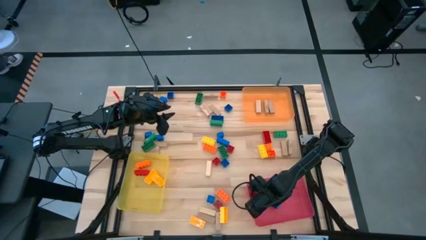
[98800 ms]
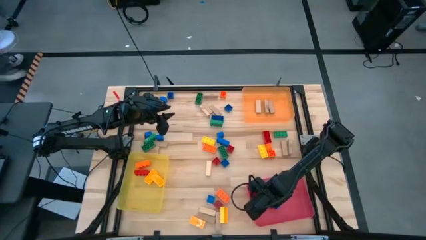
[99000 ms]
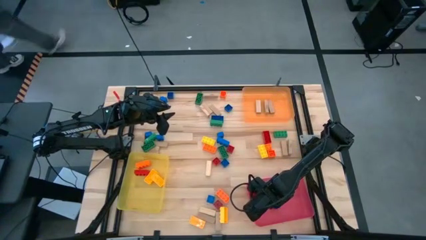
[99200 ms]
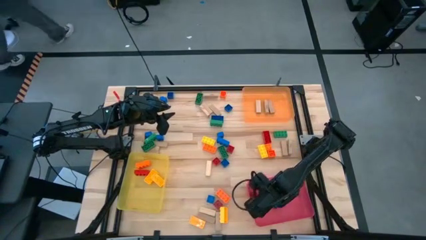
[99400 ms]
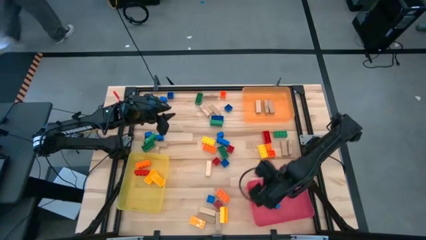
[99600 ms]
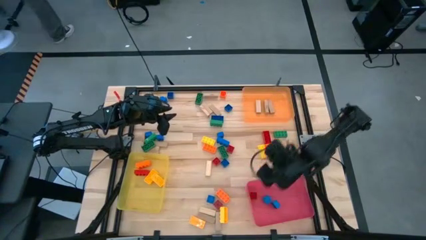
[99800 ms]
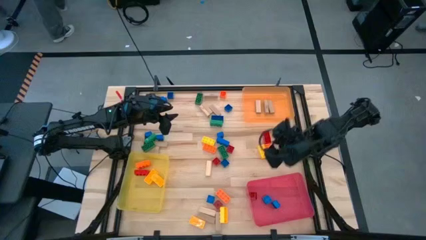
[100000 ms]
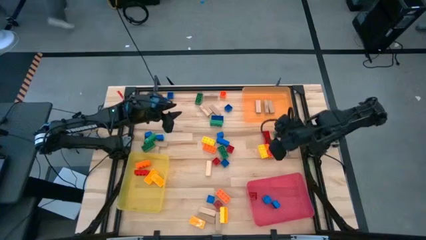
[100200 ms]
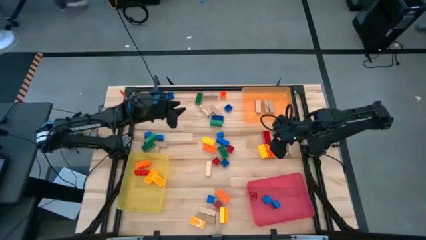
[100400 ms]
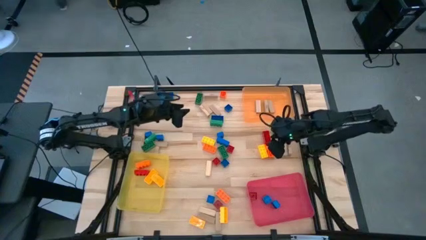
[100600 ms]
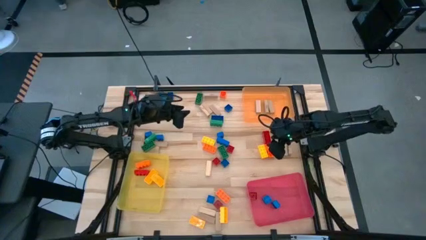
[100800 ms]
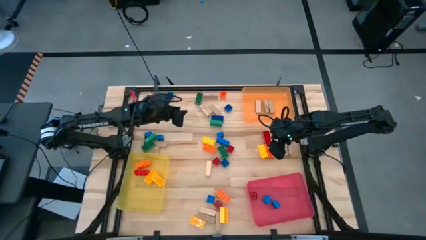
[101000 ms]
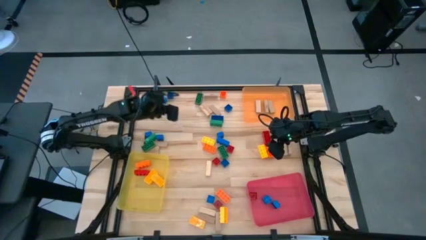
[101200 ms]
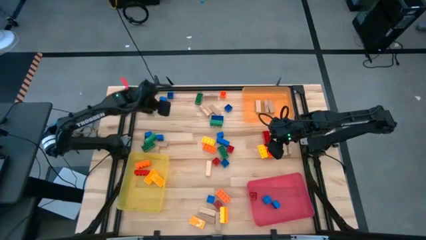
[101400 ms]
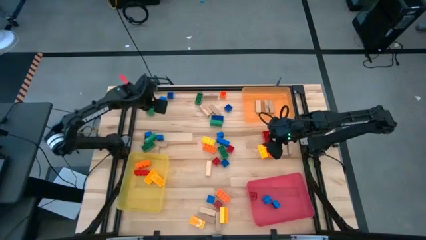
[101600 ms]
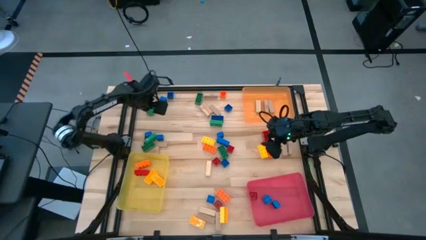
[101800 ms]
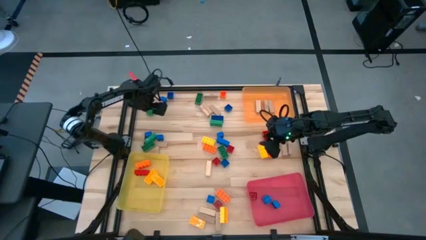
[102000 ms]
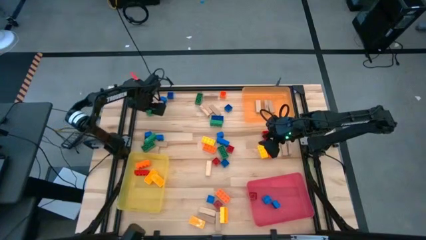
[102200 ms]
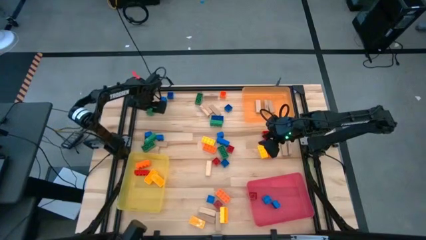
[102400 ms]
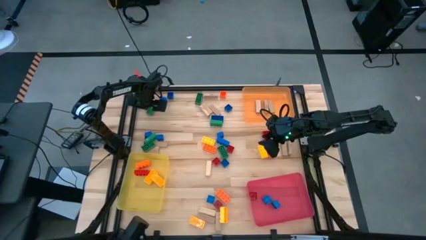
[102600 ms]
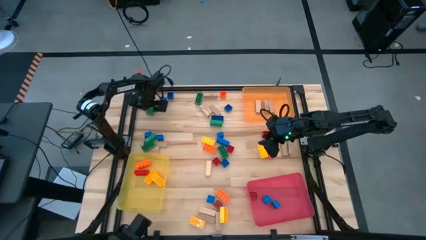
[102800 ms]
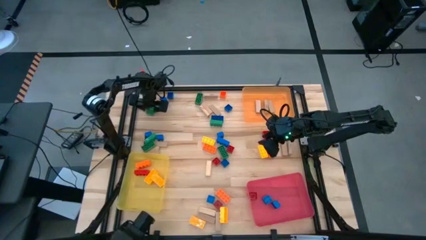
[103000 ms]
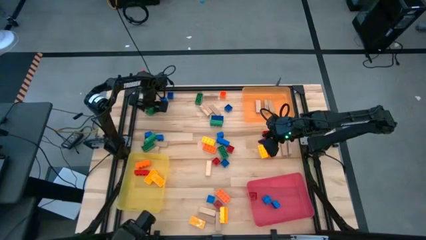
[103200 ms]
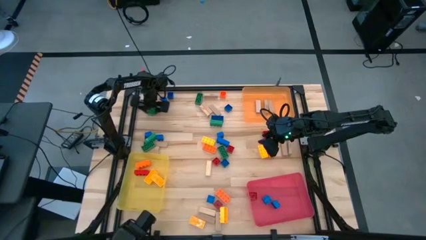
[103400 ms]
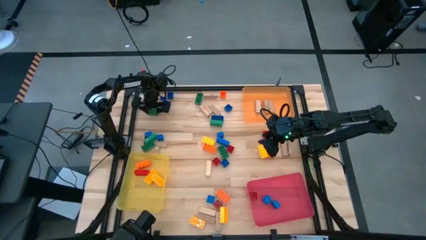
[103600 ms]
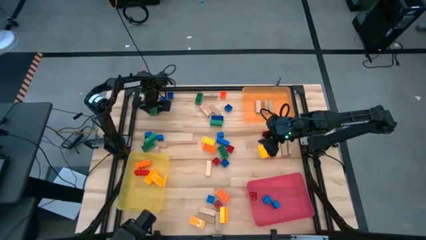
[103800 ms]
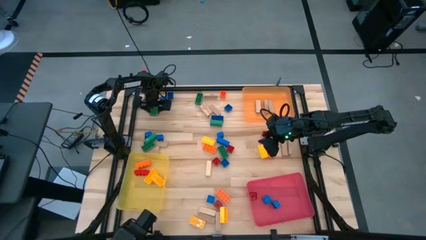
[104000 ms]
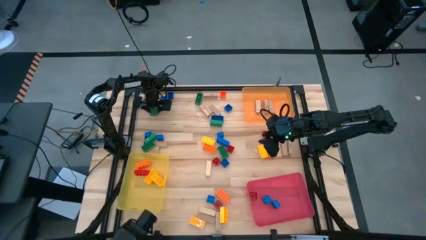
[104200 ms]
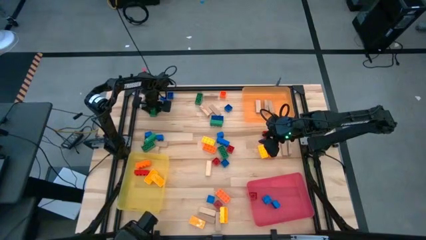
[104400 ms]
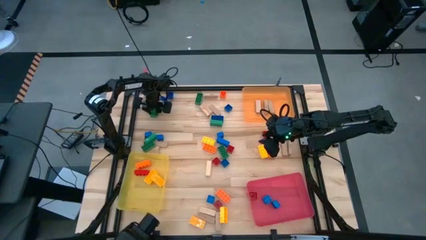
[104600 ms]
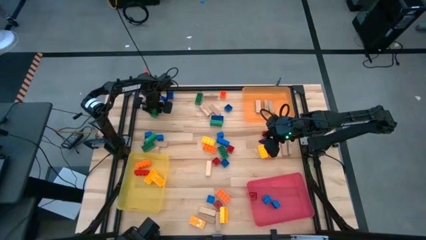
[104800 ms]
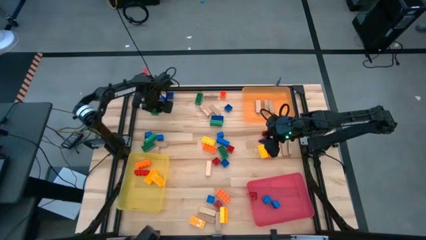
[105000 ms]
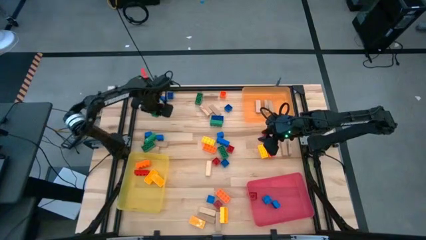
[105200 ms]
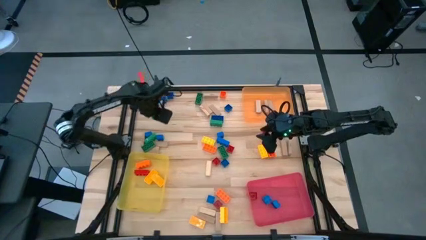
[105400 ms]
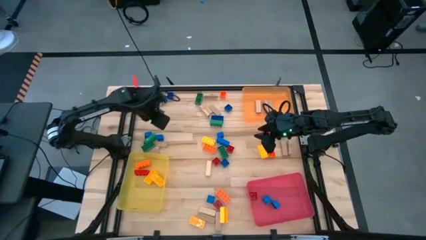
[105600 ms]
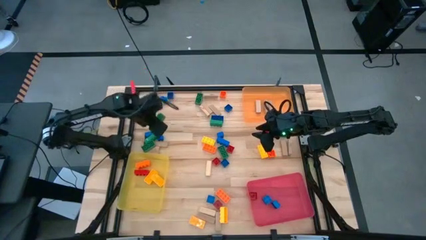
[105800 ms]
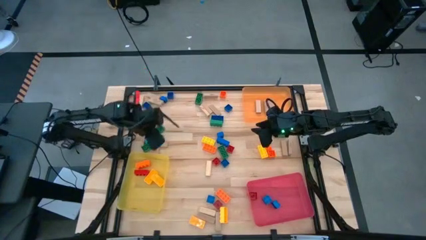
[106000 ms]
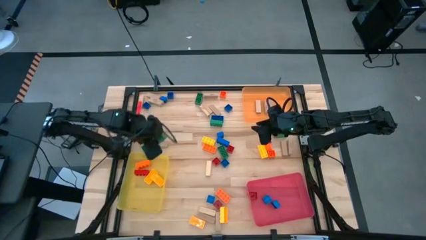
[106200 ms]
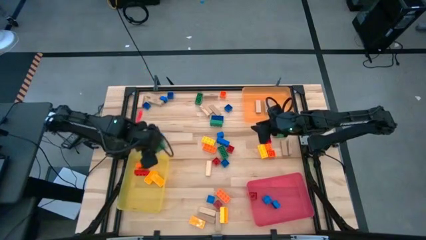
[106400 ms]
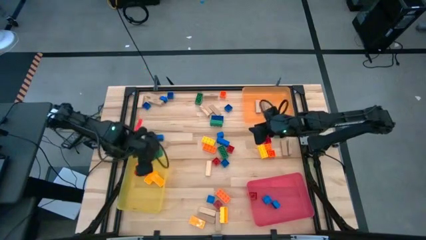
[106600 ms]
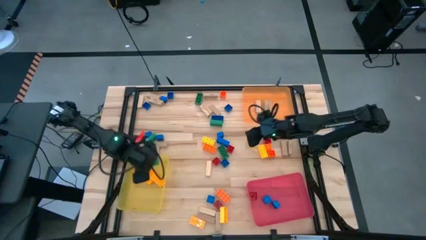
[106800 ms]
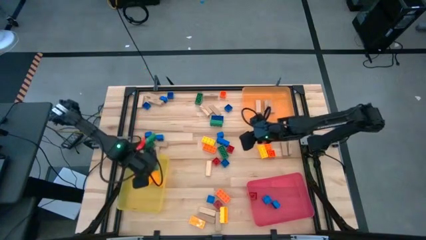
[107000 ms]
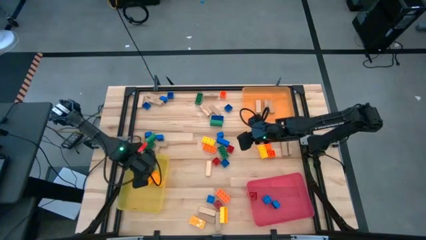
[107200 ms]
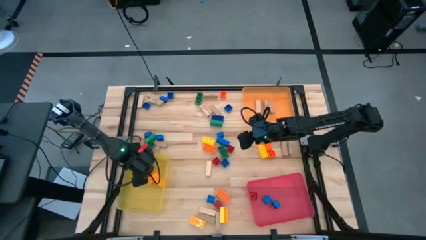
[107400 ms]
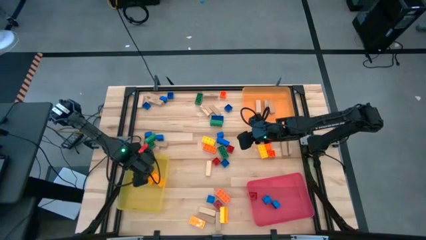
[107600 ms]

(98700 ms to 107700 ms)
Task: Sort blocks by size
Put the large green game piece into the yellow bin

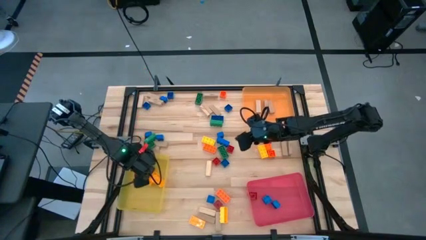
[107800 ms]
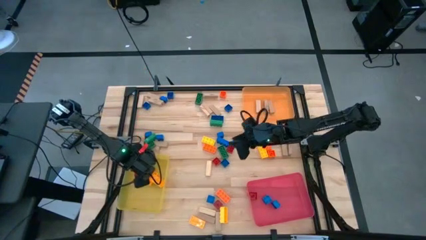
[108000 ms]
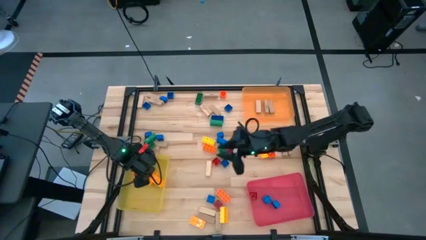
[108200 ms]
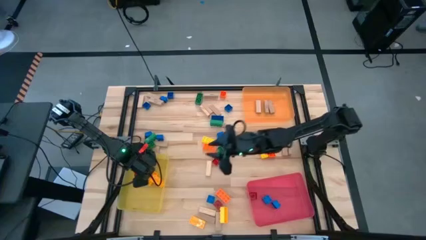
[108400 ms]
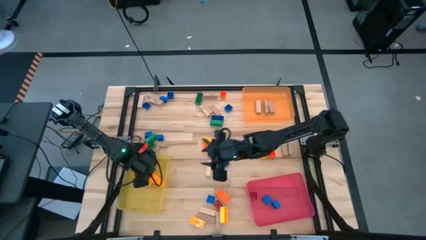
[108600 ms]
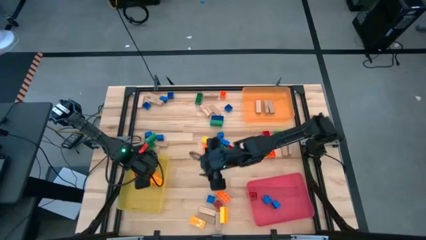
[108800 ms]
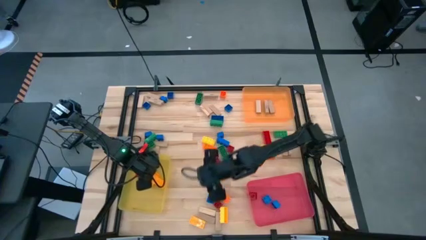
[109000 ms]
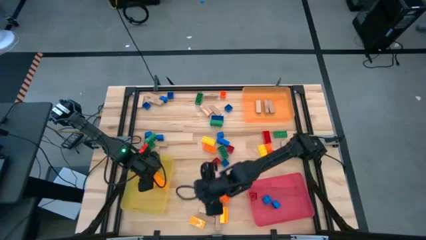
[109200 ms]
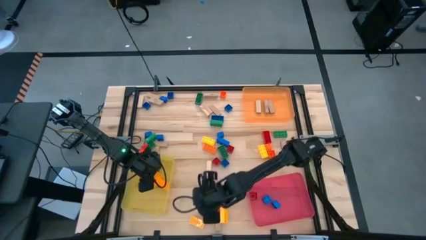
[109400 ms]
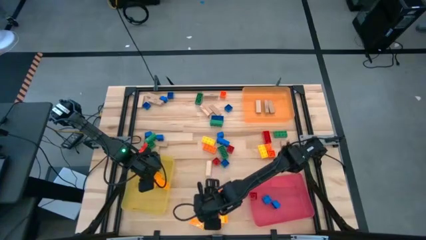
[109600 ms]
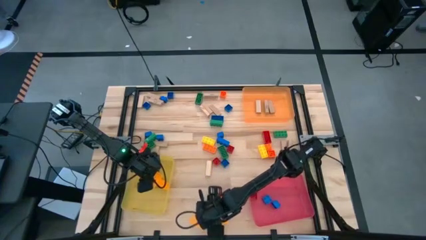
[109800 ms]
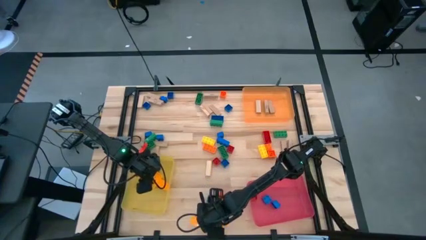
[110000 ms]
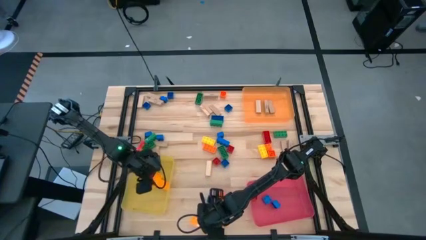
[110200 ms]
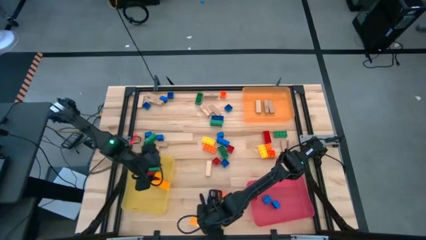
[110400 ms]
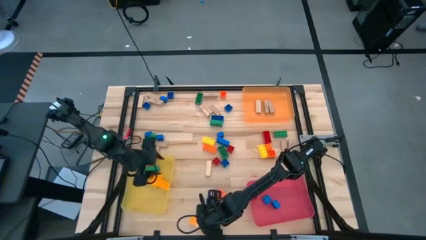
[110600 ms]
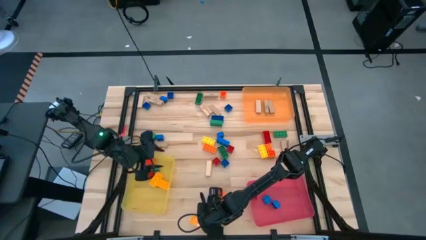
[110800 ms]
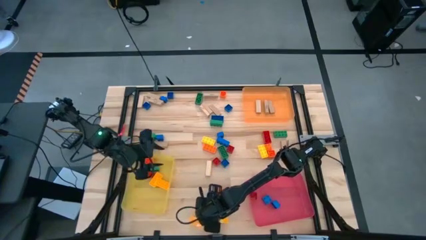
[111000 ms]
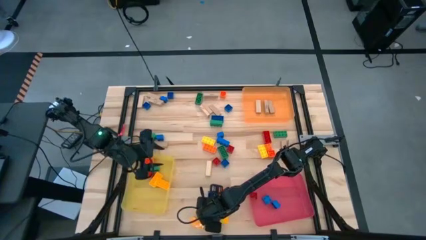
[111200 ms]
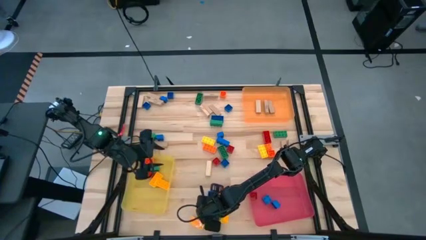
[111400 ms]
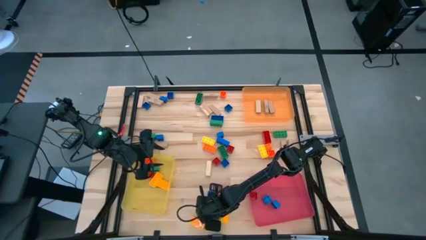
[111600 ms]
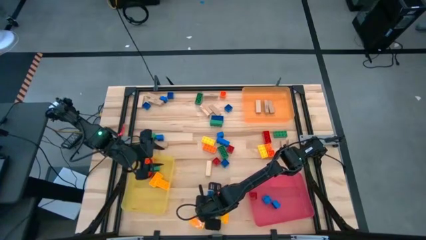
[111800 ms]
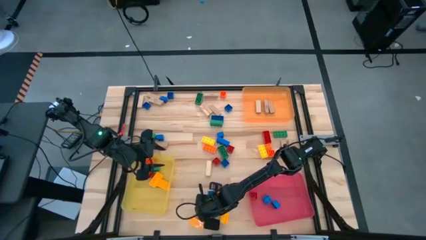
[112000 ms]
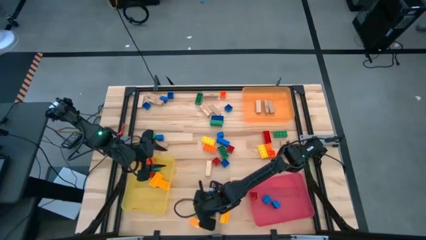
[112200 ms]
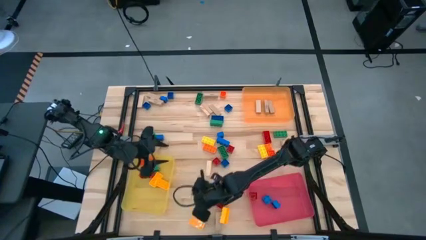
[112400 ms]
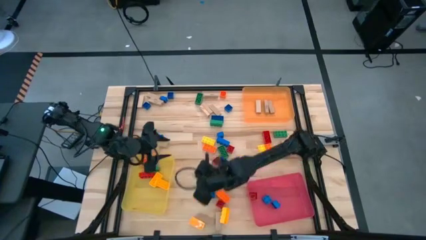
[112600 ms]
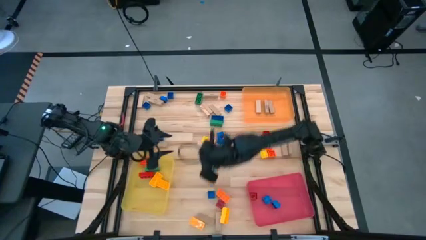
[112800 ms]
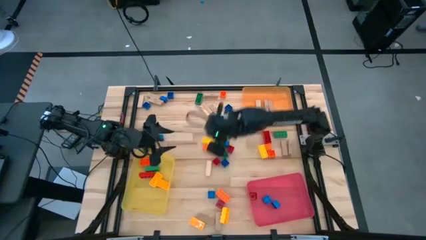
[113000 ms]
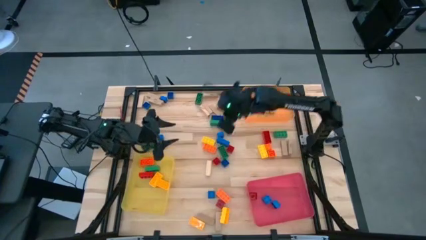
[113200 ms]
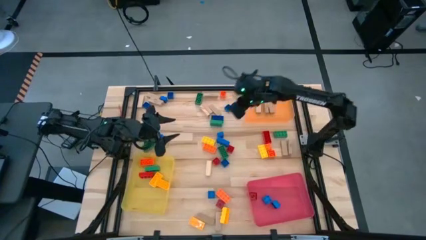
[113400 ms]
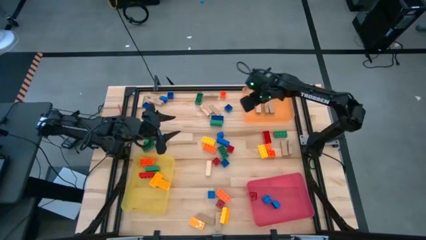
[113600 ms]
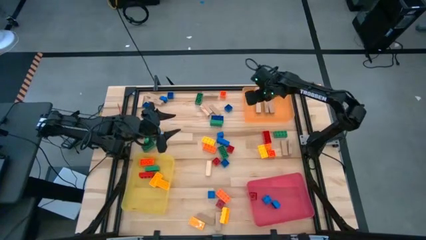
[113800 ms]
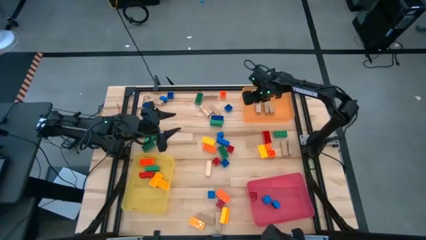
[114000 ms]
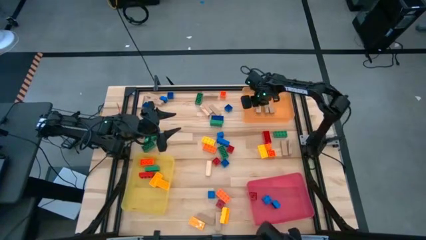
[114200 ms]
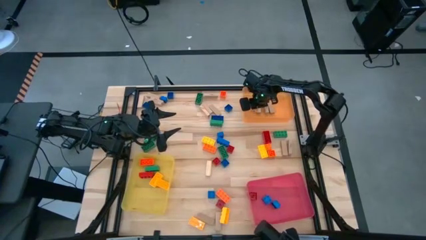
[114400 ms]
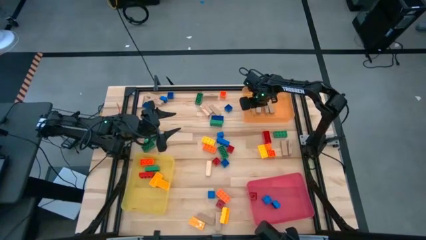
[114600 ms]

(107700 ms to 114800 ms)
Put the brown block into the orange bin
